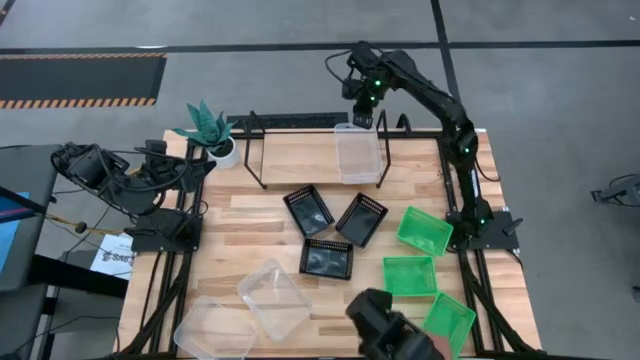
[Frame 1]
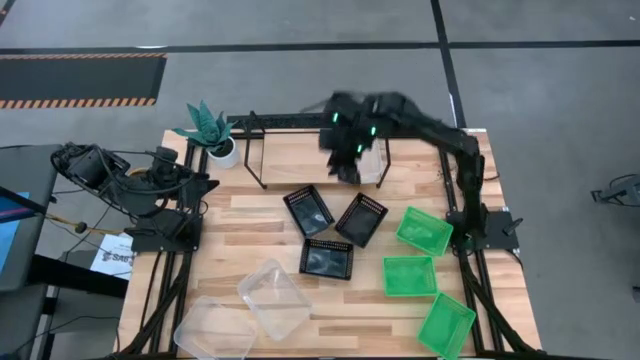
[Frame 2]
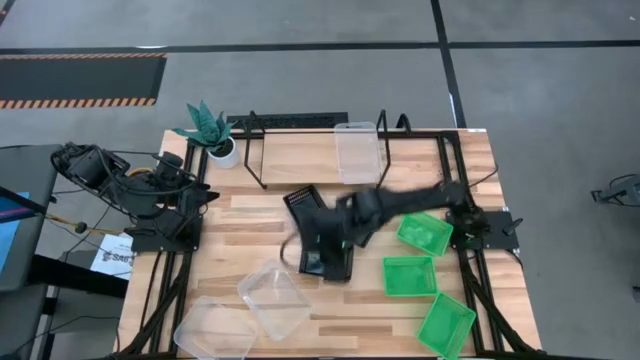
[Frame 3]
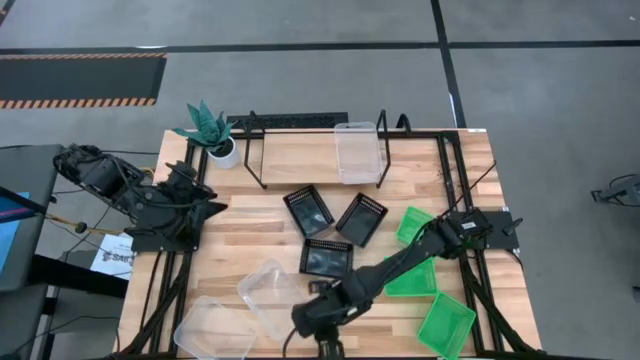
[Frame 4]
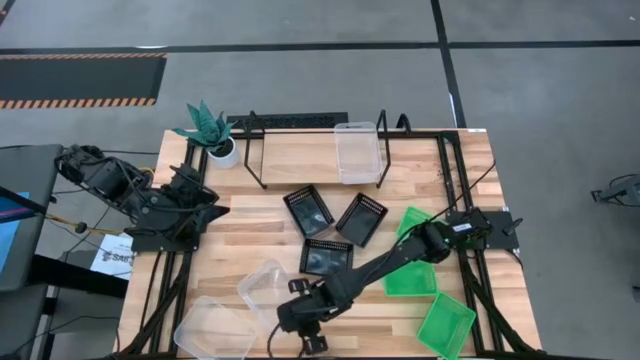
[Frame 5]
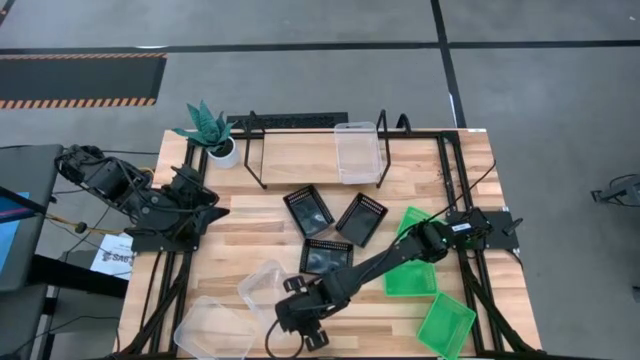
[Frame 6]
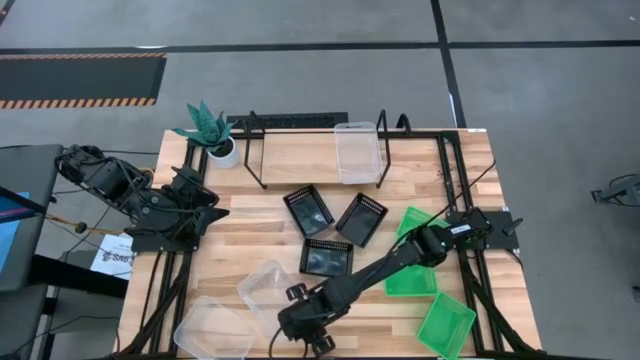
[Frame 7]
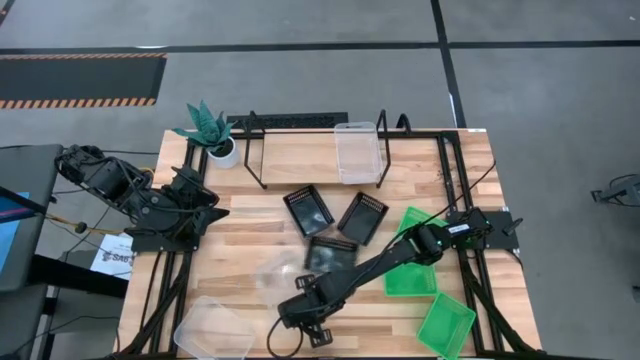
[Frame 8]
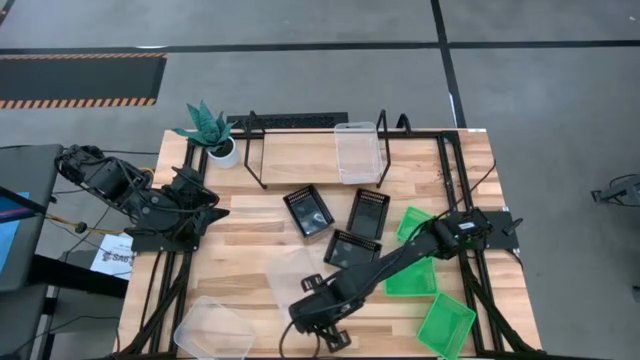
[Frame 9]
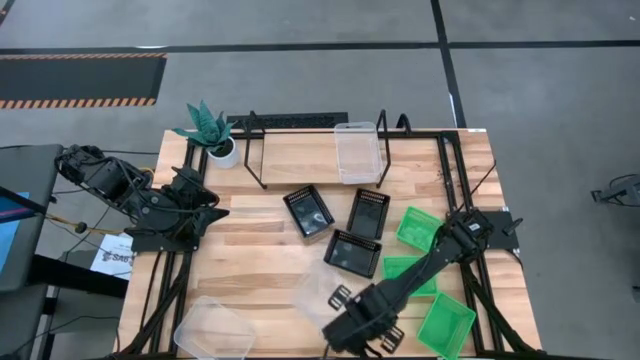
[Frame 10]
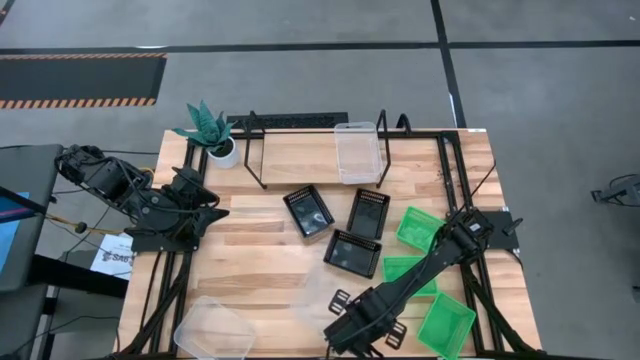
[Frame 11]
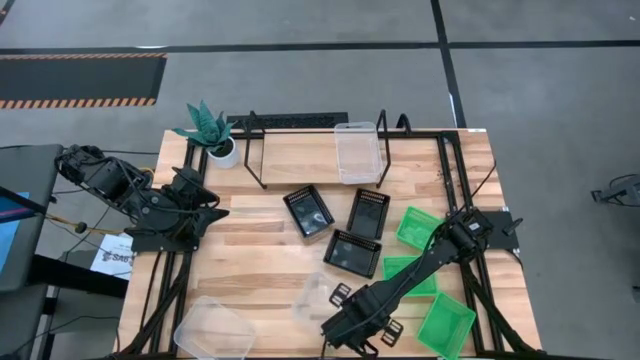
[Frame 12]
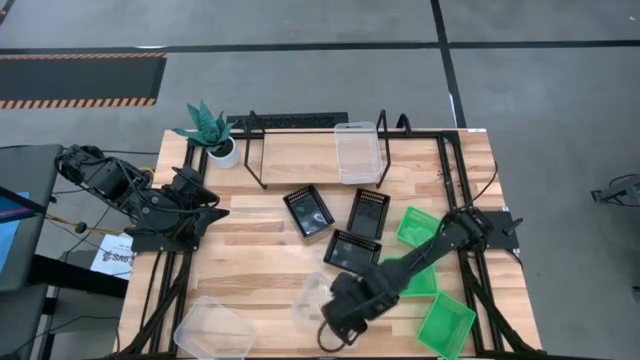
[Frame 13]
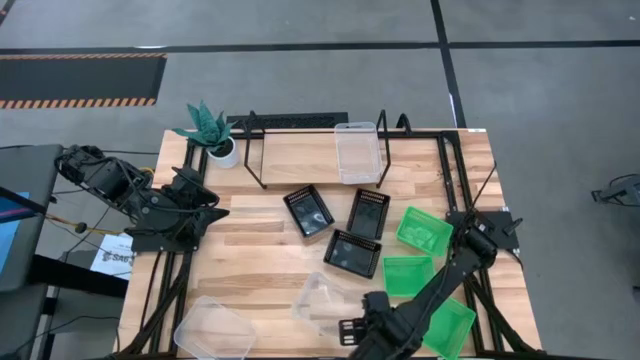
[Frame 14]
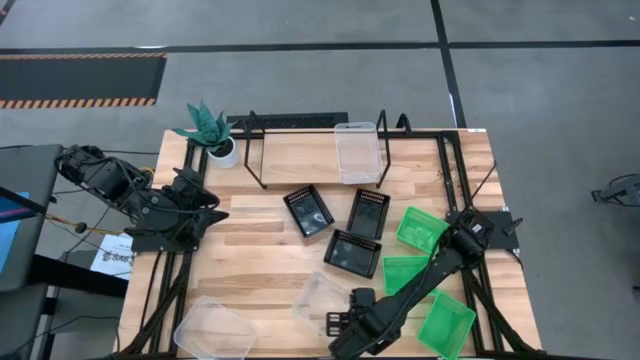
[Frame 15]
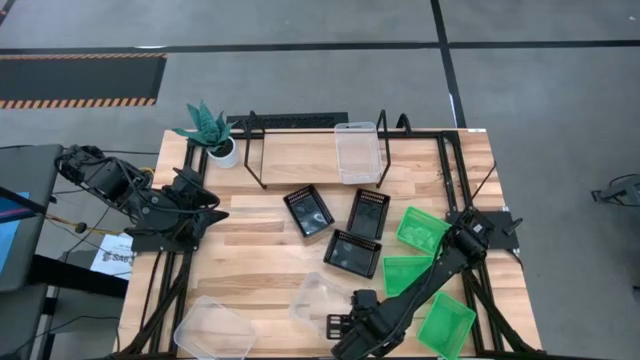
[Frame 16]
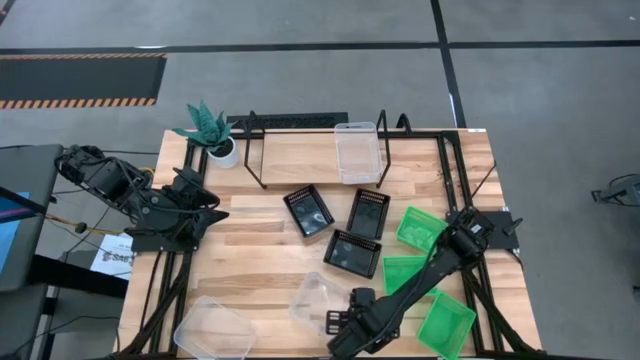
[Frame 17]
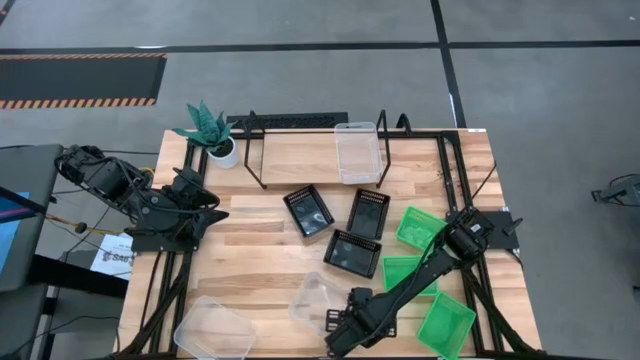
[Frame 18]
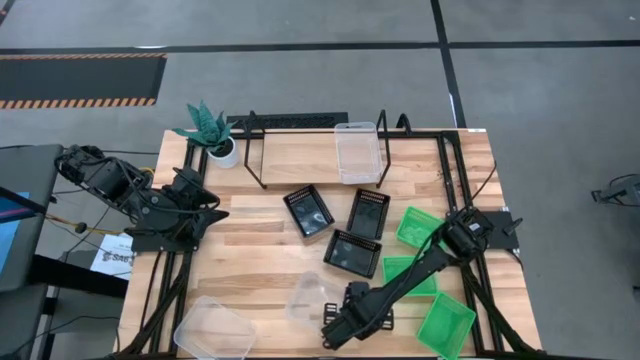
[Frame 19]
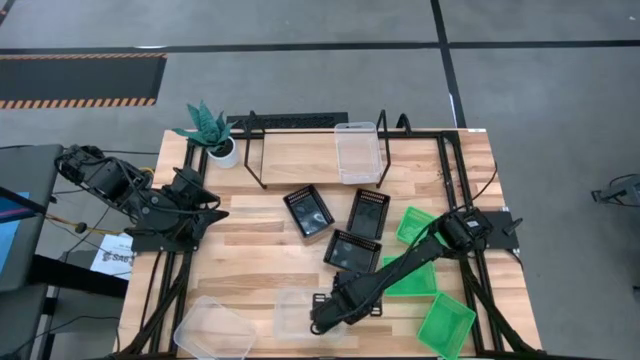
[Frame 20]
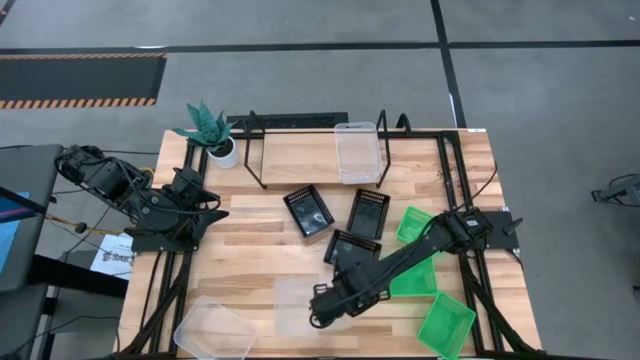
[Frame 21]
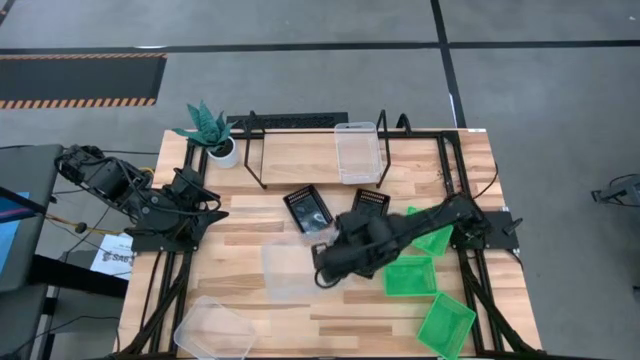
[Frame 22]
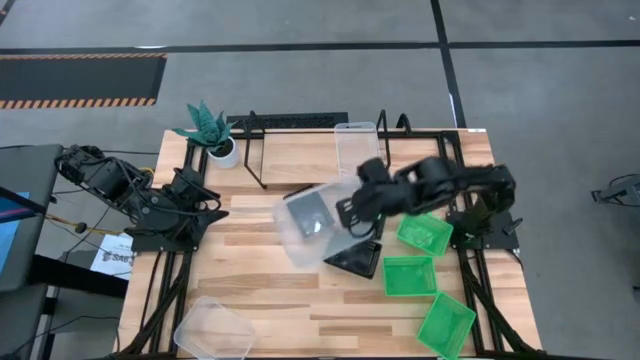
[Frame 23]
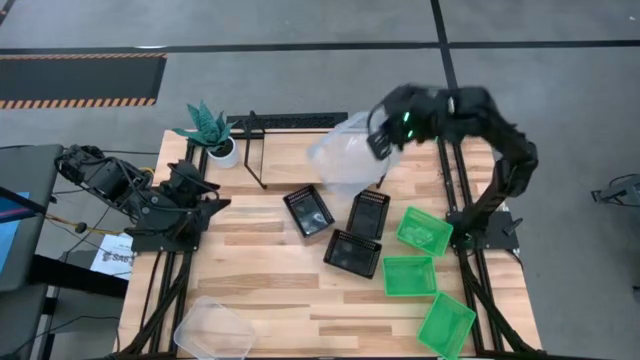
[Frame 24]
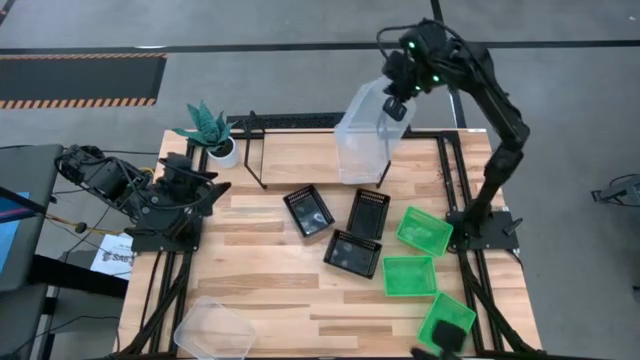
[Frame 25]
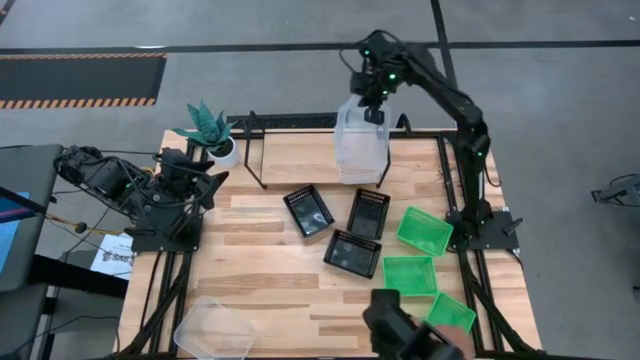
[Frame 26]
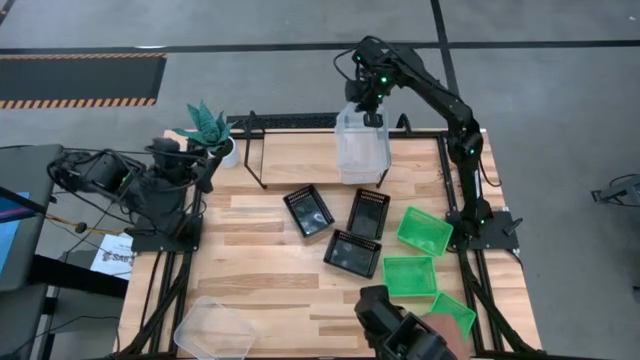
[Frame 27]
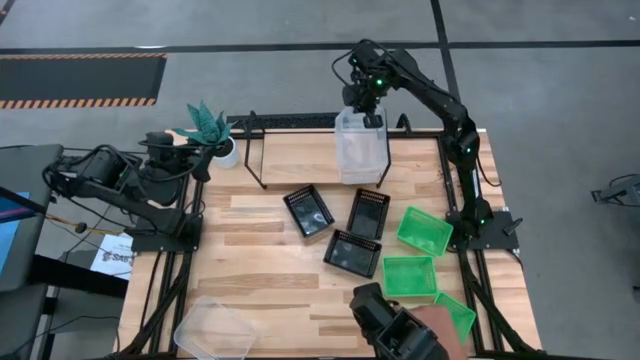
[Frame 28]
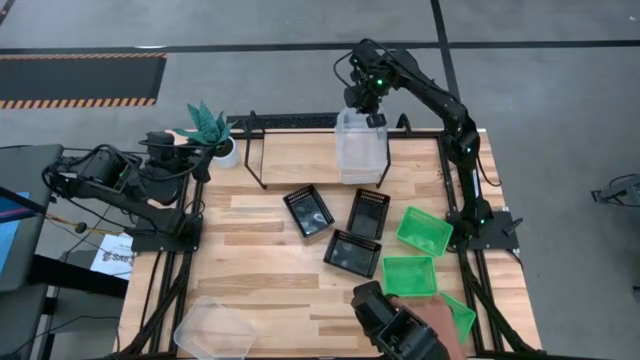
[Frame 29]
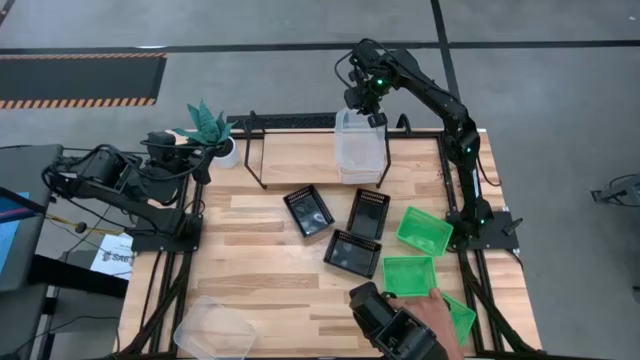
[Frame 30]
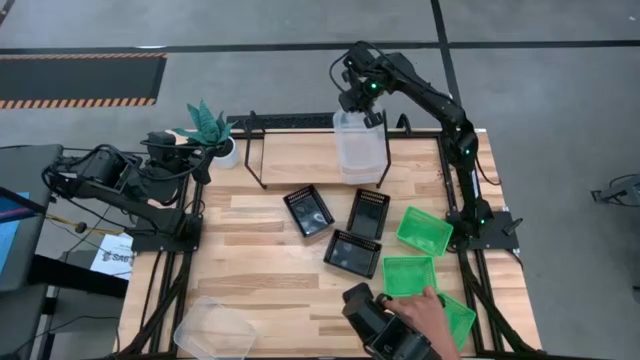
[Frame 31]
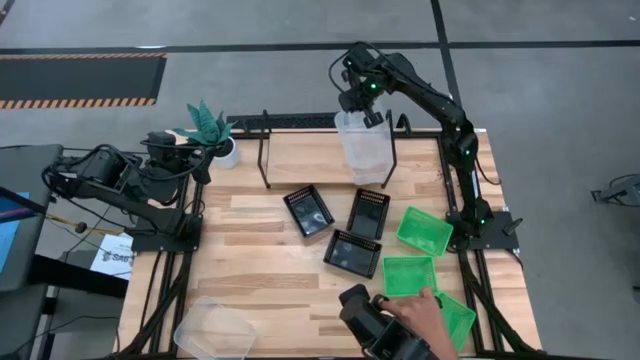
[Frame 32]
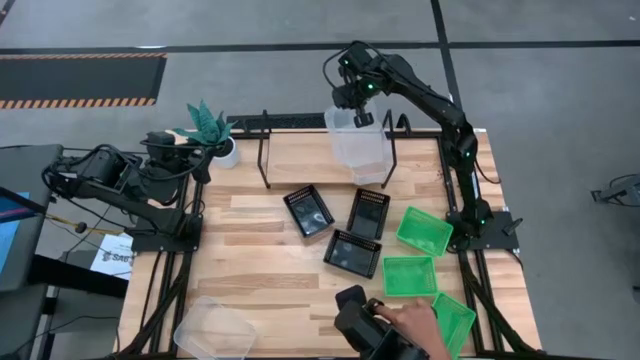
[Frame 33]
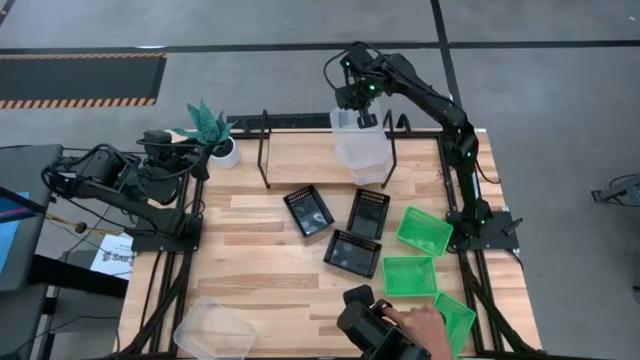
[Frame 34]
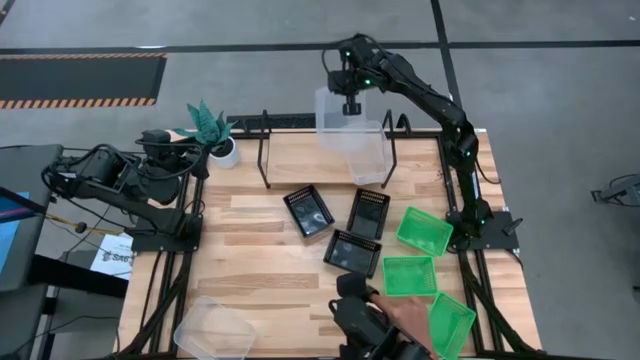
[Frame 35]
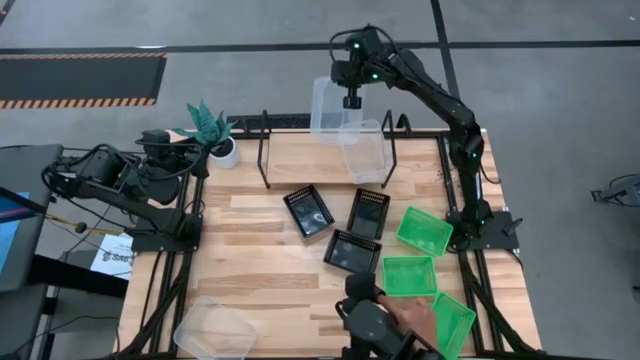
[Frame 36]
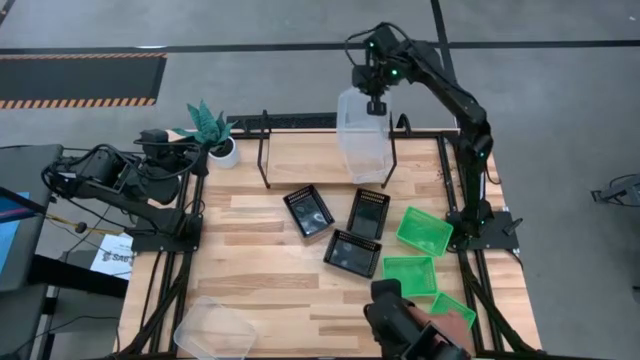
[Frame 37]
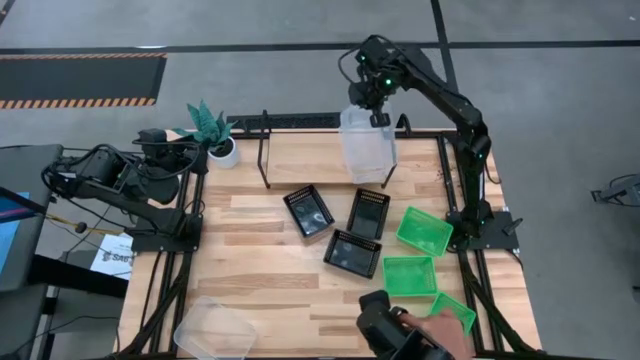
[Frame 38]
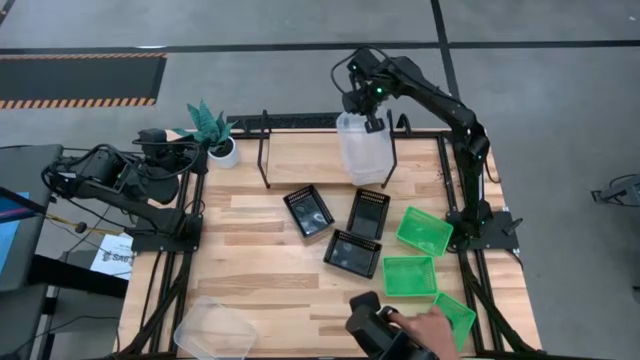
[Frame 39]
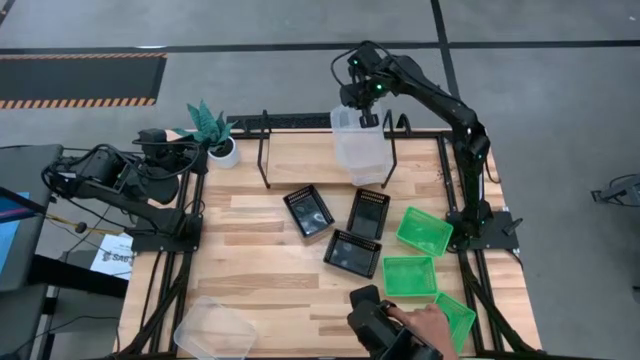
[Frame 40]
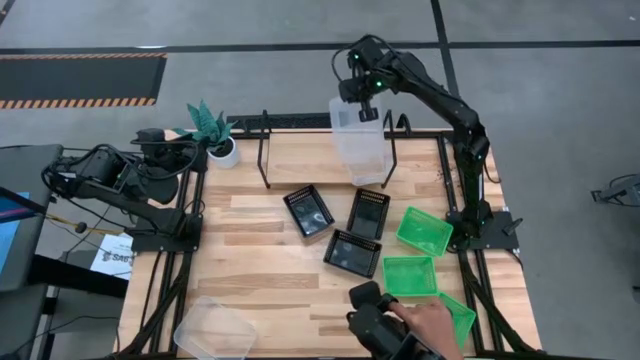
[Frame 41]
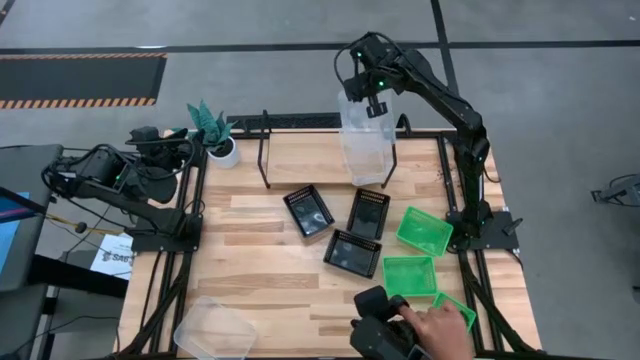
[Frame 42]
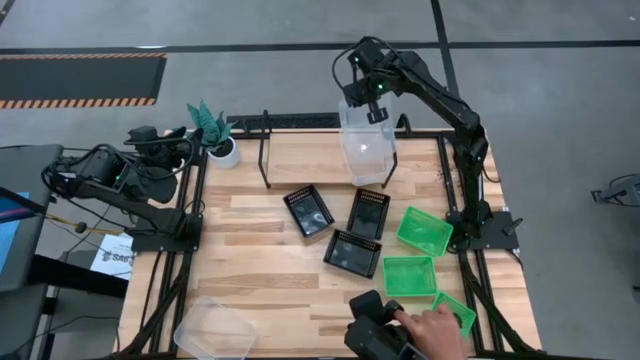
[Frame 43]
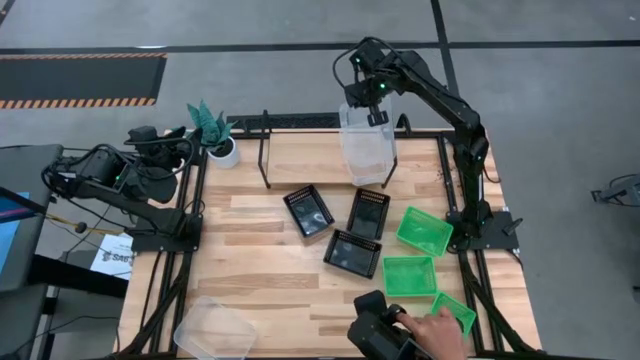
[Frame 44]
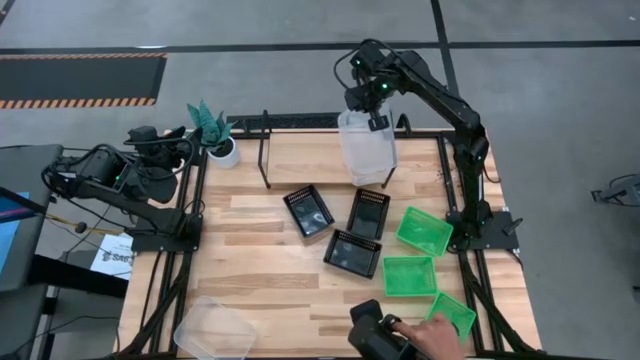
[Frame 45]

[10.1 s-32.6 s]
Task: Stack baskets on shelf by color
Stack the right transparent bin on top of the transparent bin on the shelf
